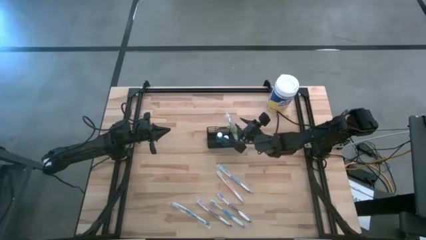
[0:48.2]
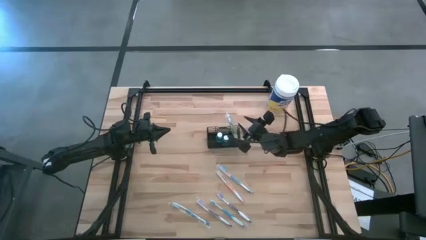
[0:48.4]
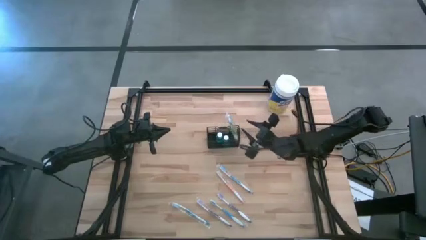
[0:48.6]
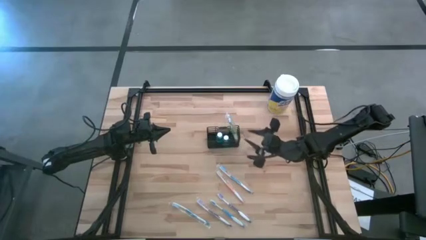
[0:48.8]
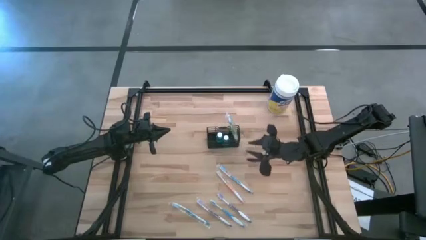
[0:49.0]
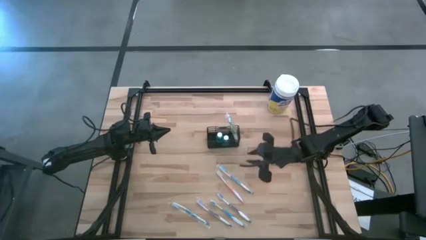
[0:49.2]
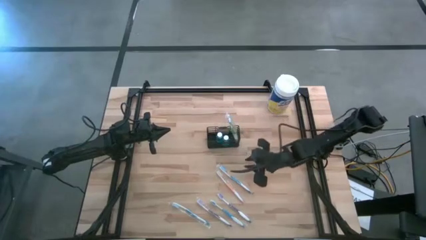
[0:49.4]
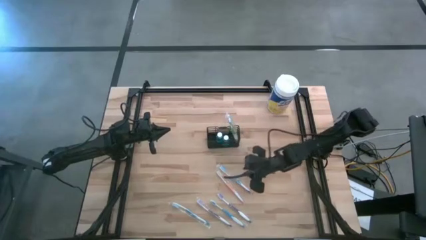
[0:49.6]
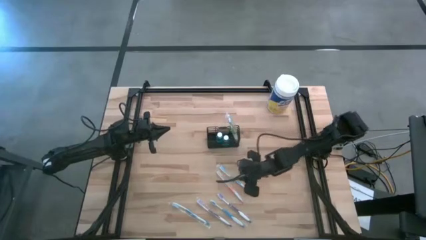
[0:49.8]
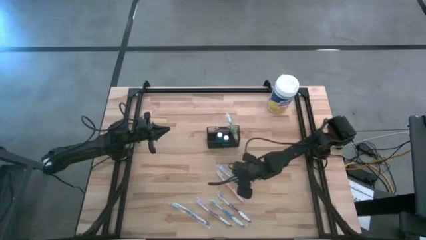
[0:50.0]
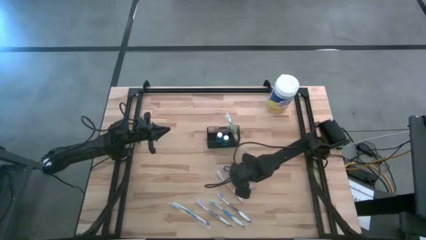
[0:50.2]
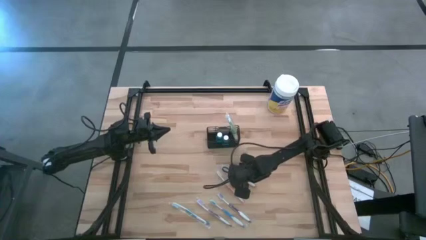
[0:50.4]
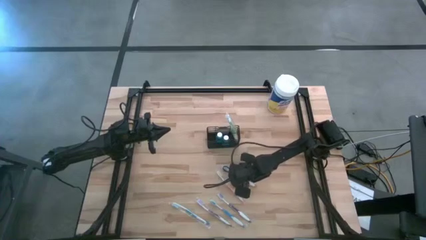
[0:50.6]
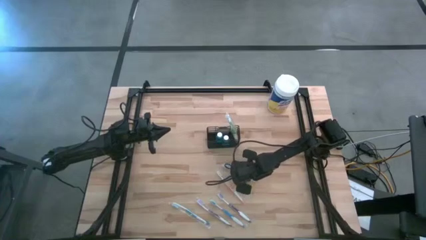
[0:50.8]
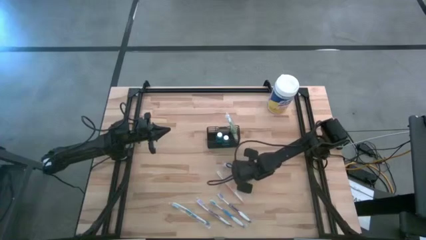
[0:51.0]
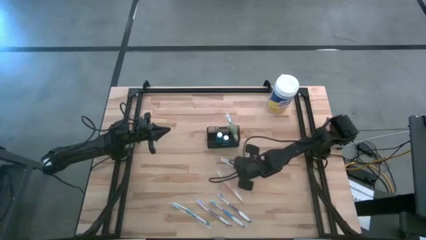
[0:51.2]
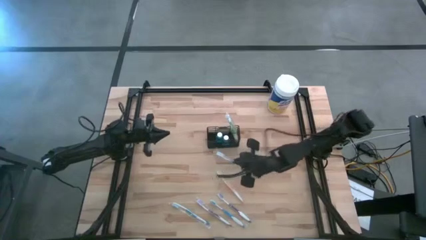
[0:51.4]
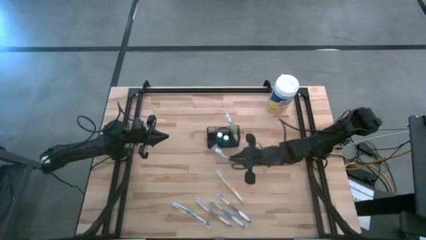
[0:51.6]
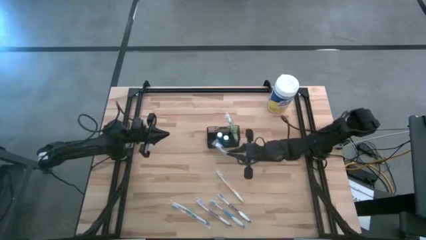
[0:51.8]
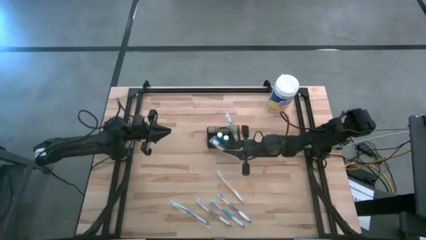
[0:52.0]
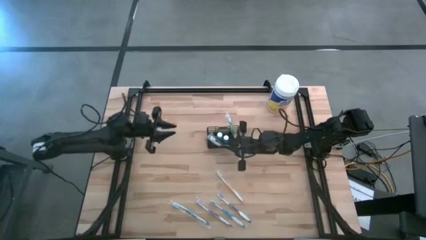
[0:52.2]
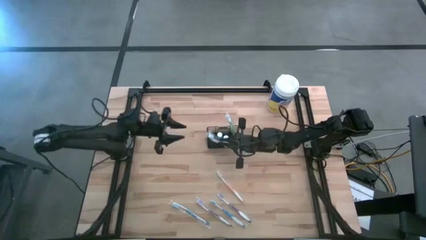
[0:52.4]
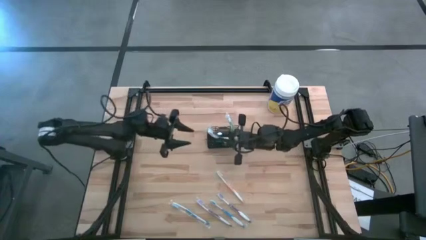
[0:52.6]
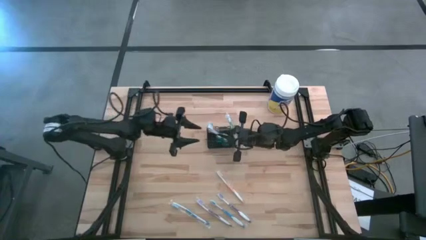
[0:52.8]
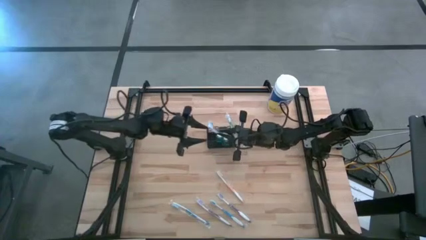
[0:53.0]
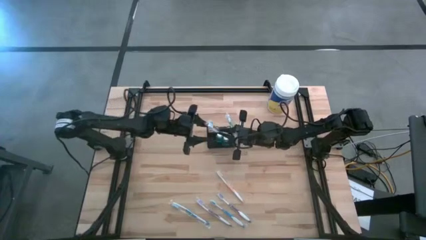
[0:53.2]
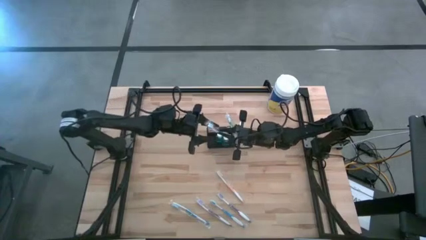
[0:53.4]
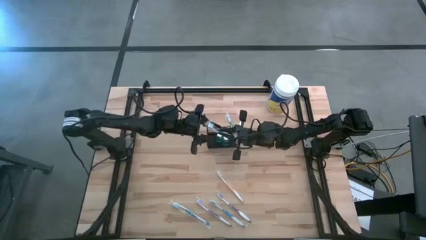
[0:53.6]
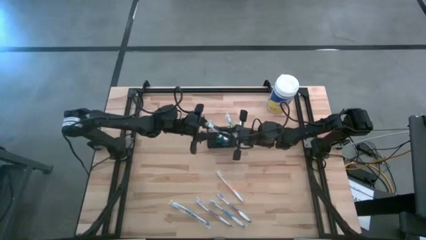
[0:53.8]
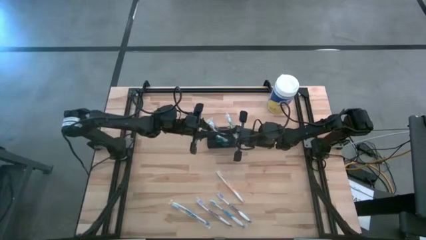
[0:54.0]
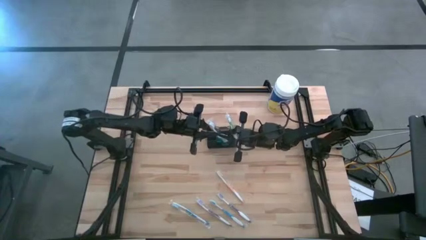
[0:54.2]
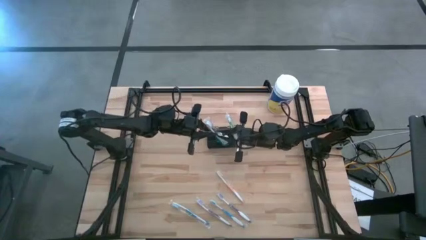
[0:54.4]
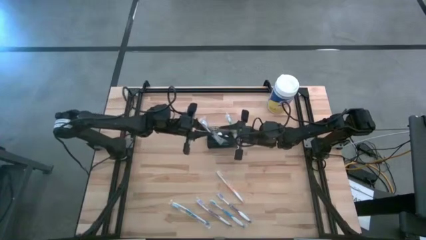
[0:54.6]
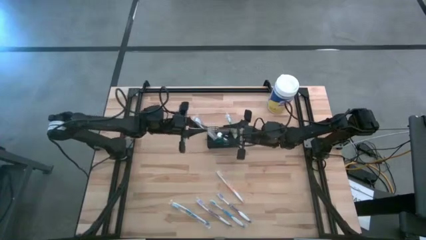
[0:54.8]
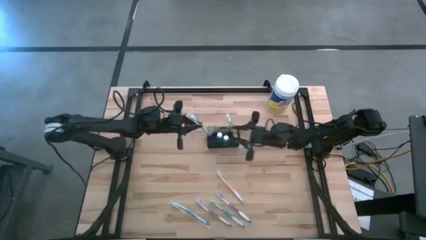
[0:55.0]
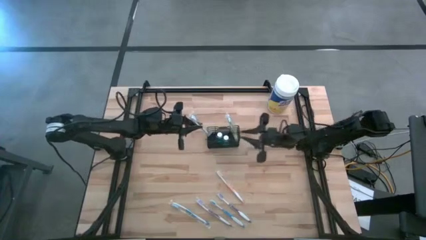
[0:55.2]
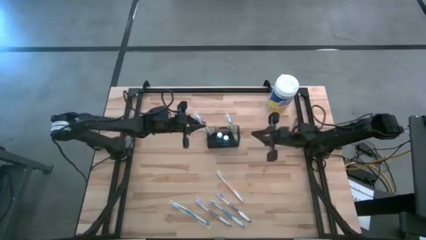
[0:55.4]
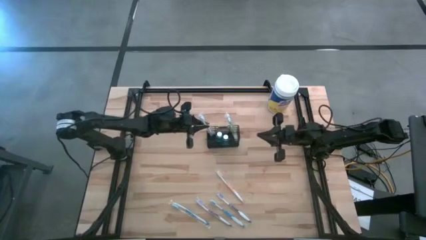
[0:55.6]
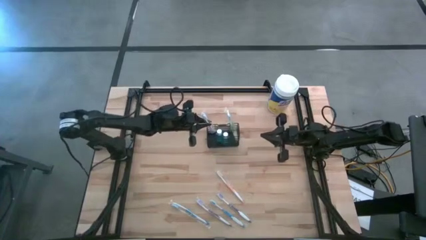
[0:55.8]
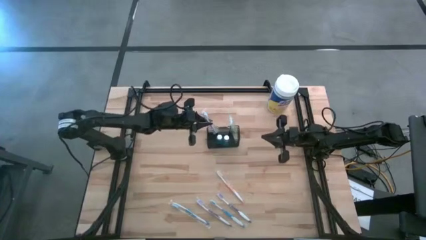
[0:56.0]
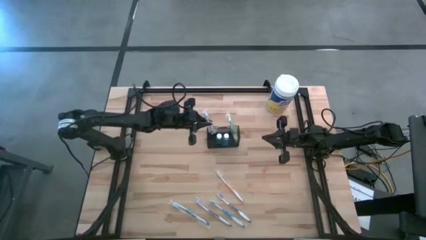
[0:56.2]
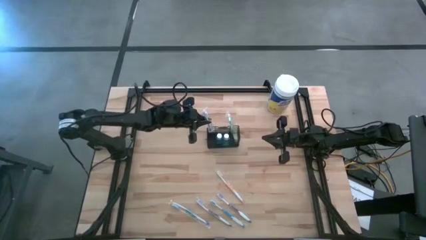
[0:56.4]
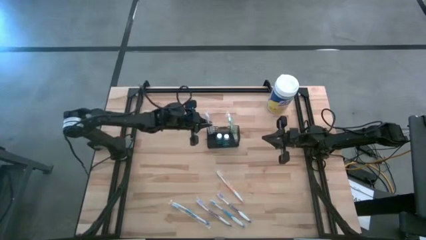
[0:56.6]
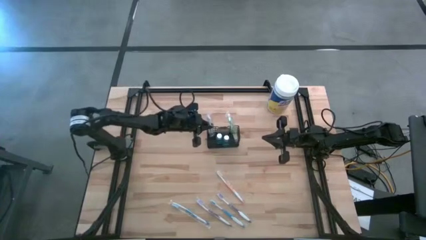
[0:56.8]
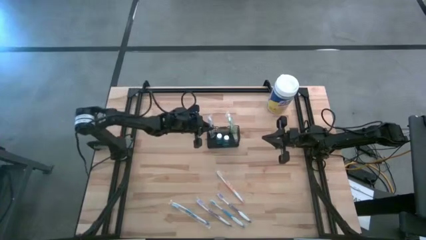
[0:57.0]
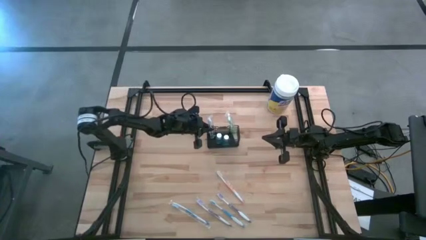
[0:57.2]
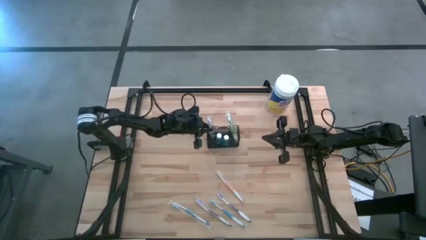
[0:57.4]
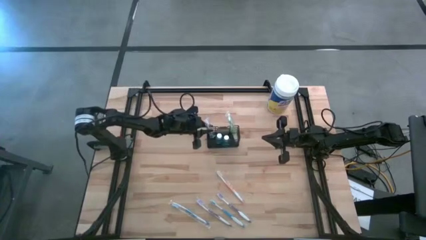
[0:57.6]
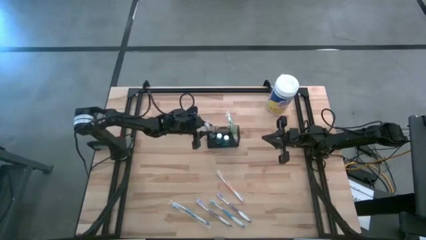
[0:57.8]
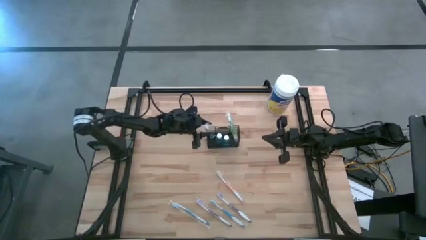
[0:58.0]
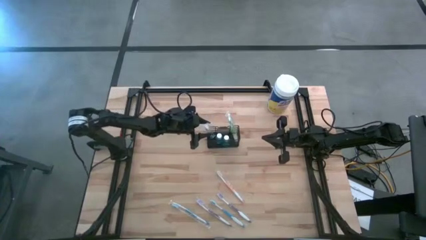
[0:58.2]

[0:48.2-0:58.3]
Task: Pick & Place toothbrushing station
Put the top right blue toothbrush into the wire organizer
